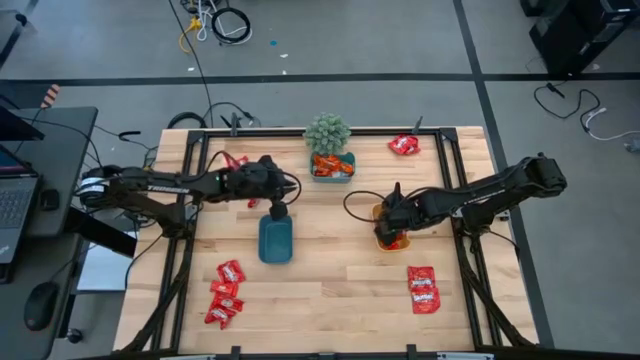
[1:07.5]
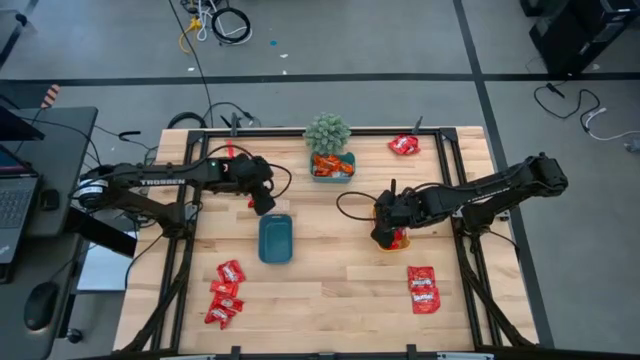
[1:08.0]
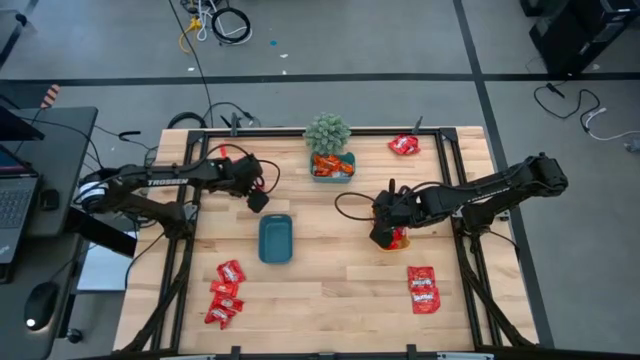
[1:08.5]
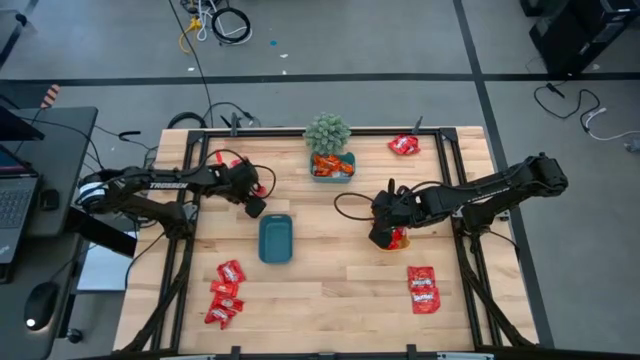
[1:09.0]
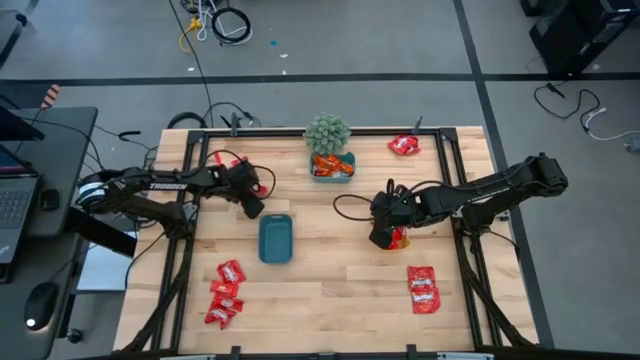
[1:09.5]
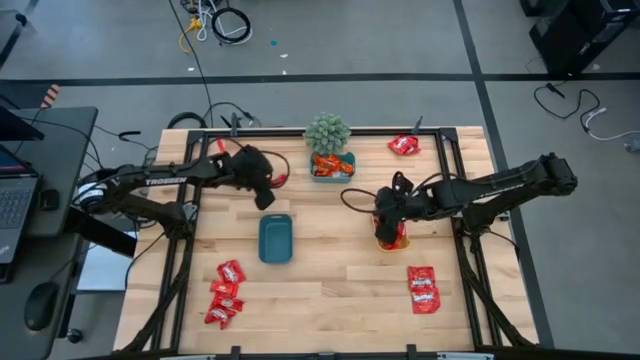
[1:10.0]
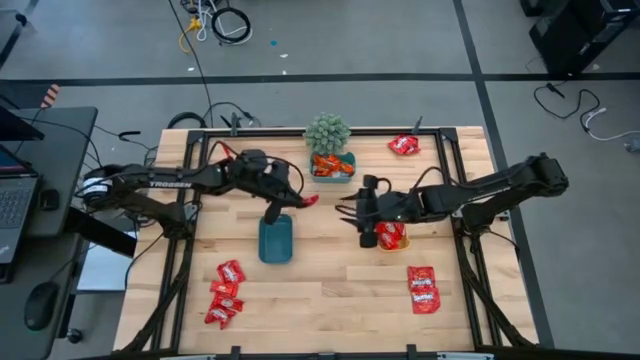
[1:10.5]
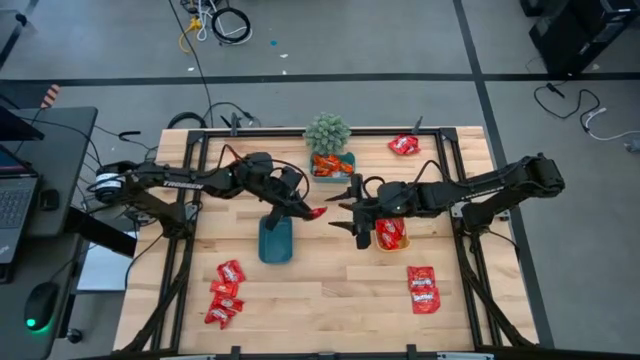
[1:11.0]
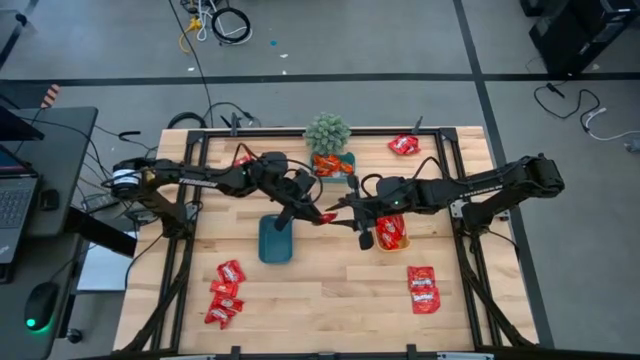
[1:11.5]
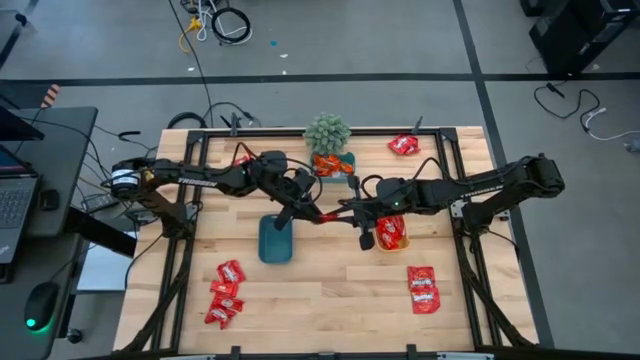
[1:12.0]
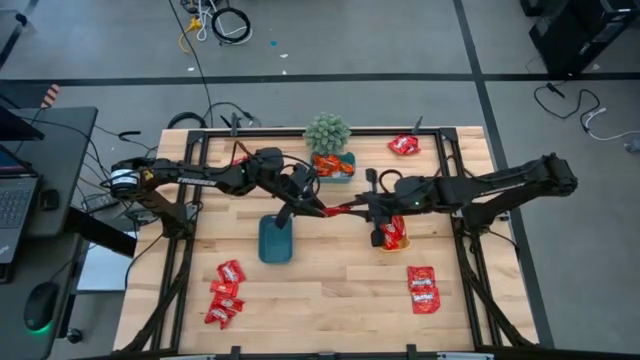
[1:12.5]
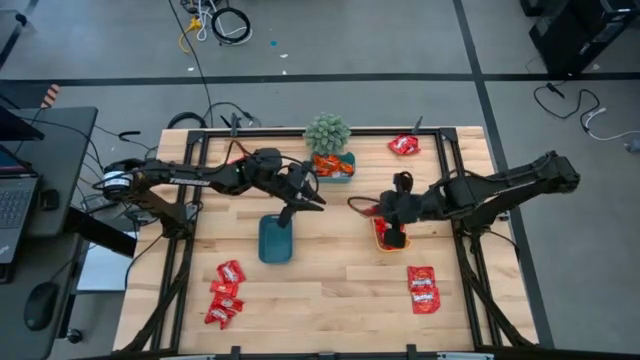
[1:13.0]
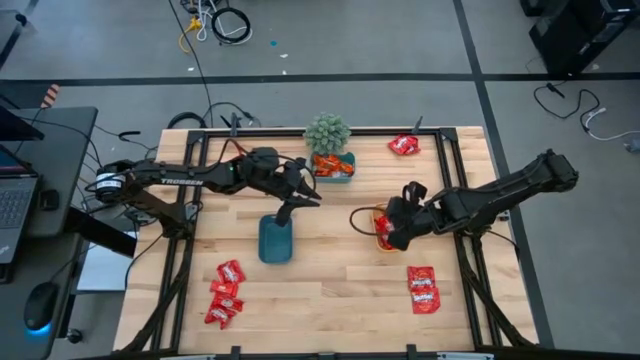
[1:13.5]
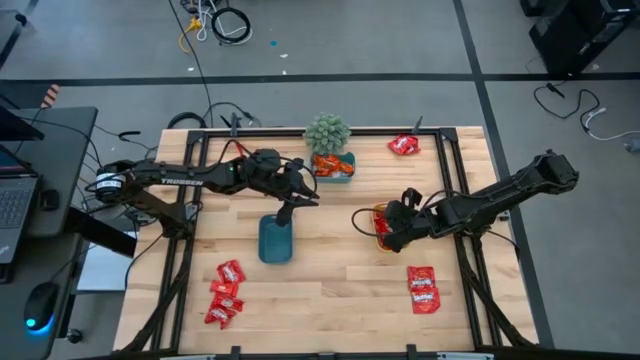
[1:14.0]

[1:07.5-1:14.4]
Task: Sort candy
Put the red chocolate into the yellow bin

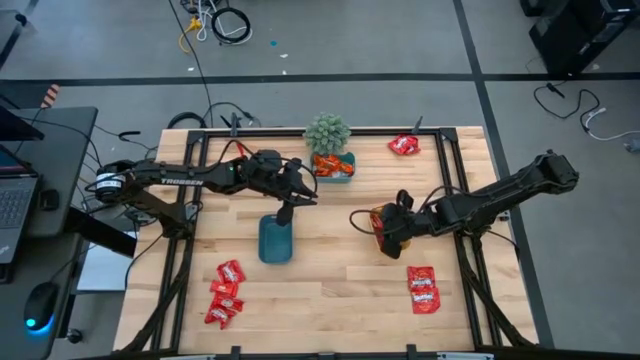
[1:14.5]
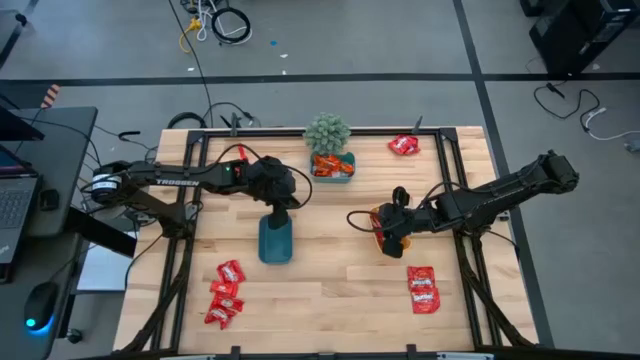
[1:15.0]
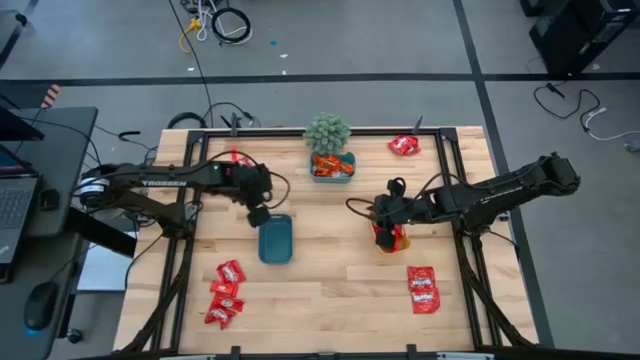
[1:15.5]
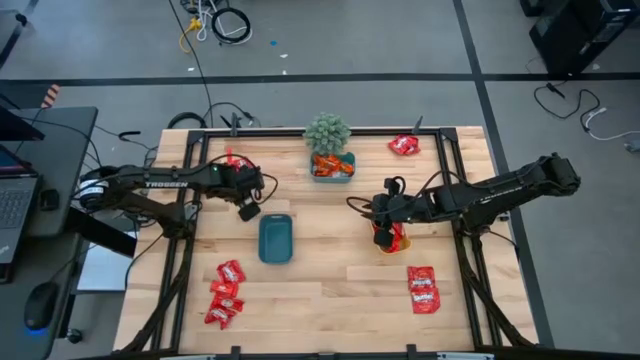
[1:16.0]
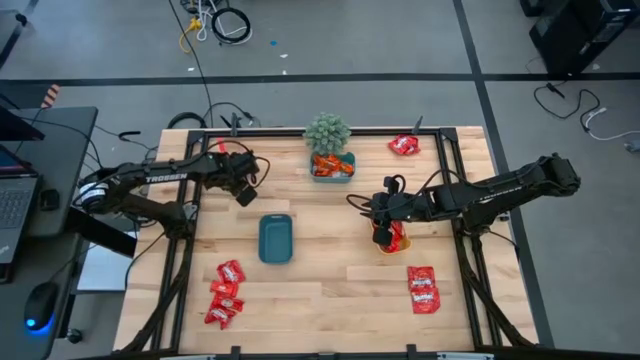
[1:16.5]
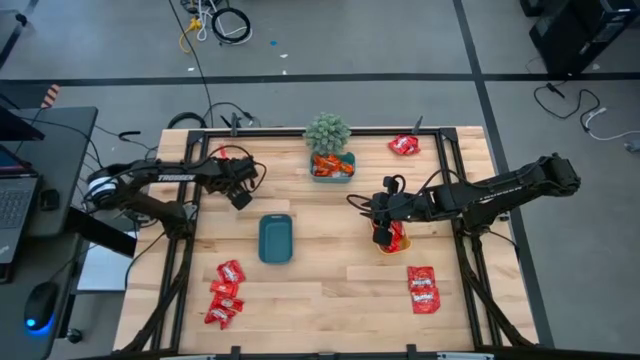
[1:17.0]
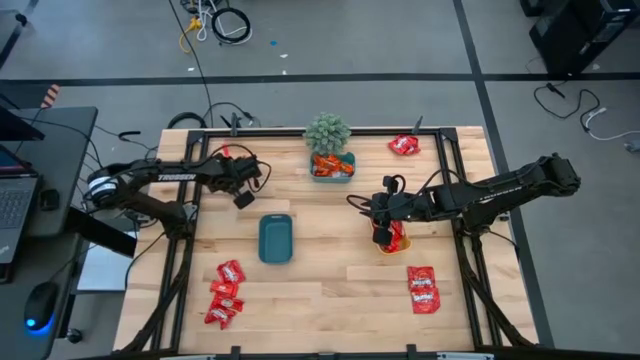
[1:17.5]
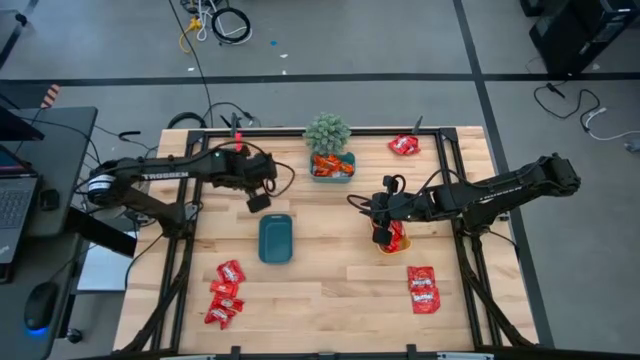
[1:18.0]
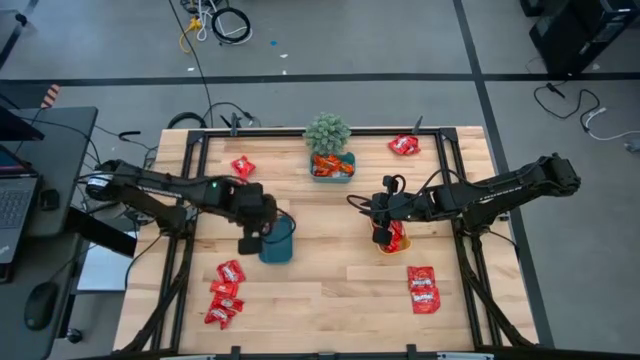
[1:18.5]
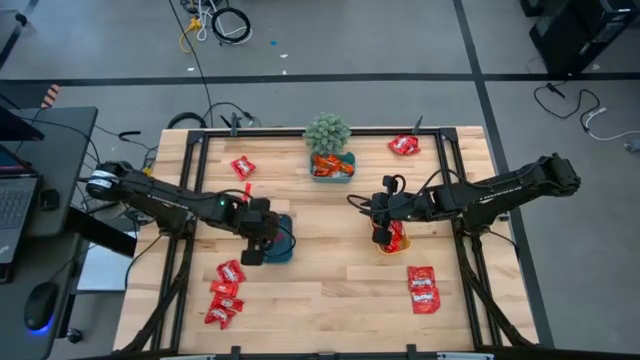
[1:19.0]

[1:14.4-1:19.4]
Put the red candy into the blue bin

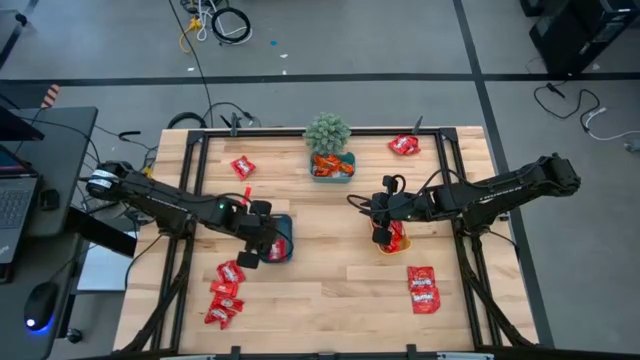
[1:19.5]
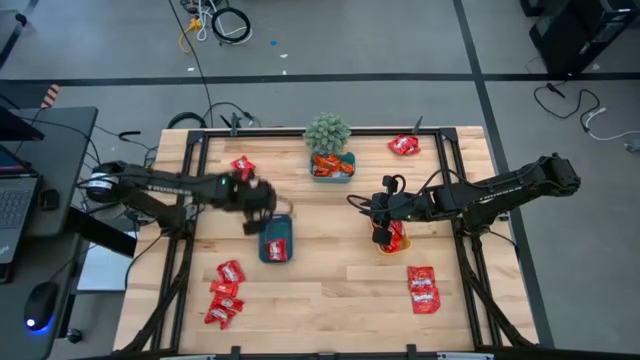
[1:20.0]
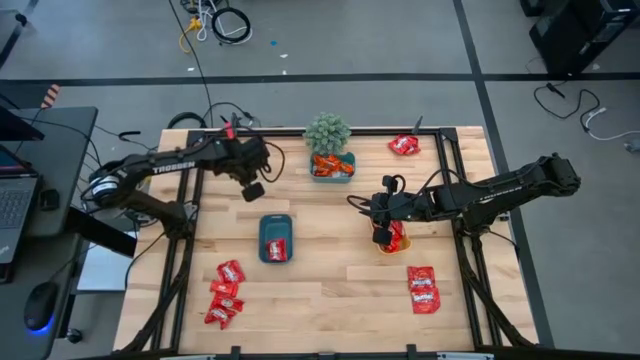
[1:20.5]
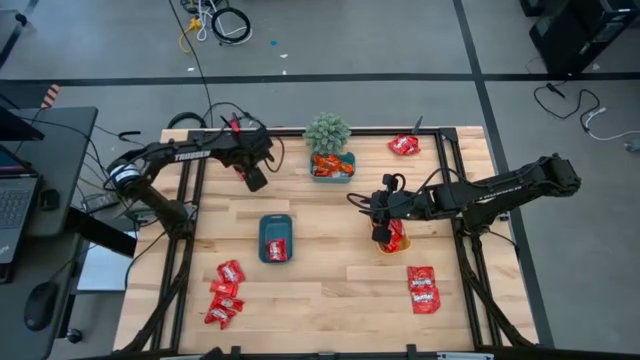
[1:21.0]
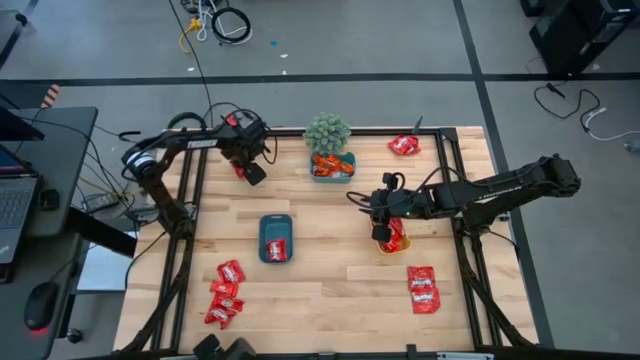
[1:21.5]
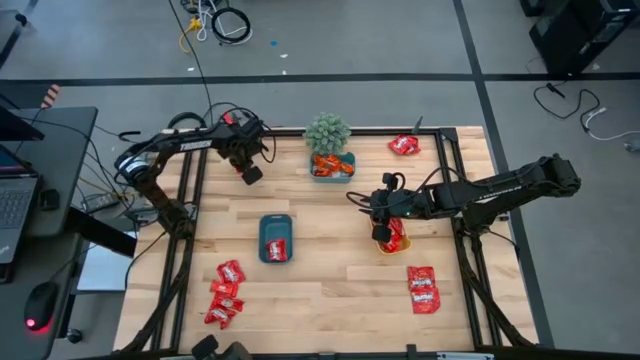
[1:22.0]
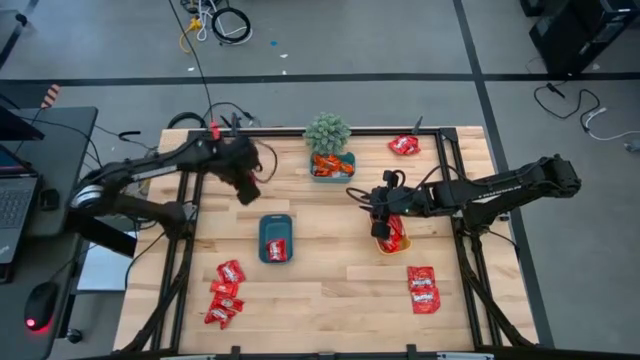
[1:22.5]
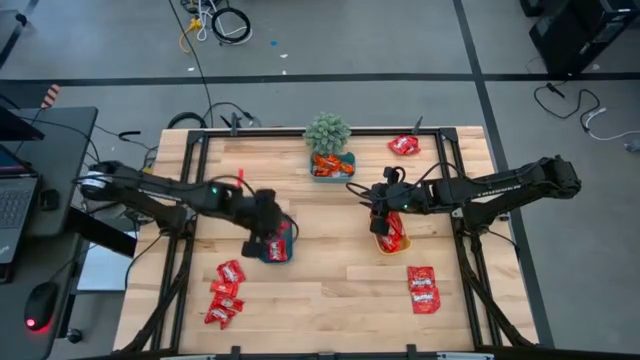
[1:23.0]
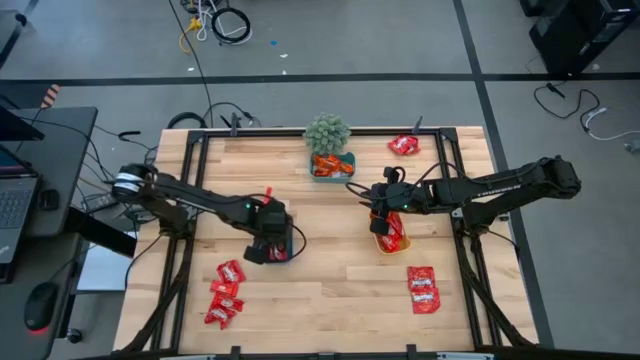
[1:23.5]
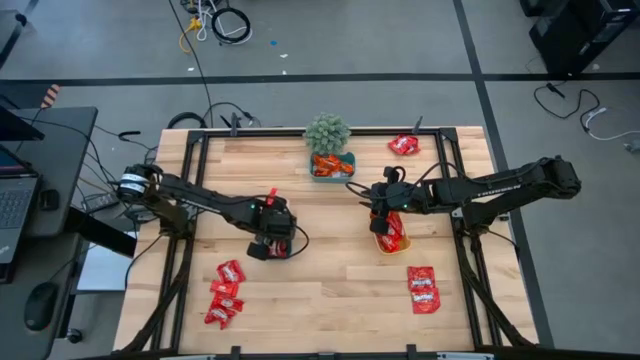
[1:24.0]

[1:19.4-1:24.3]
Put the red candy into the blue bin

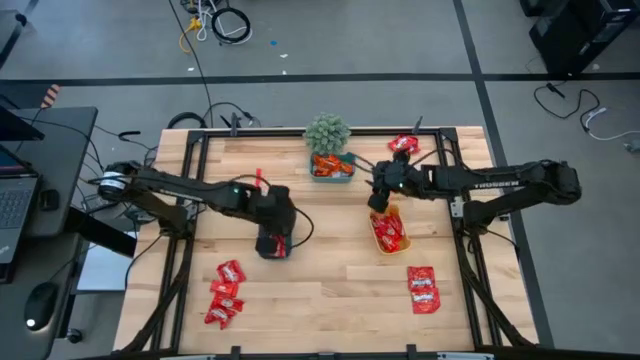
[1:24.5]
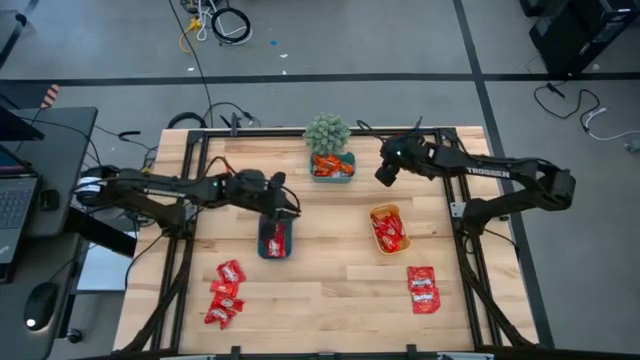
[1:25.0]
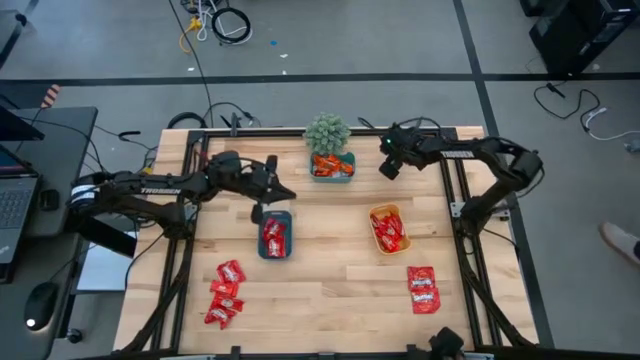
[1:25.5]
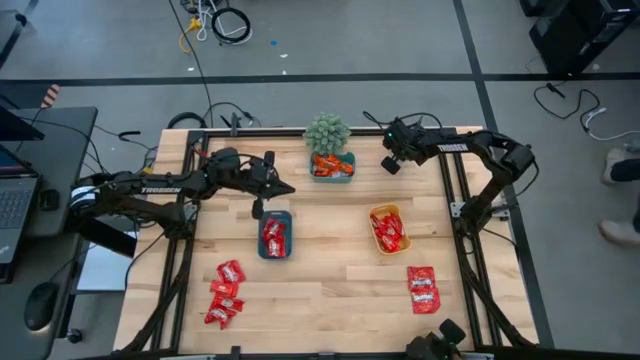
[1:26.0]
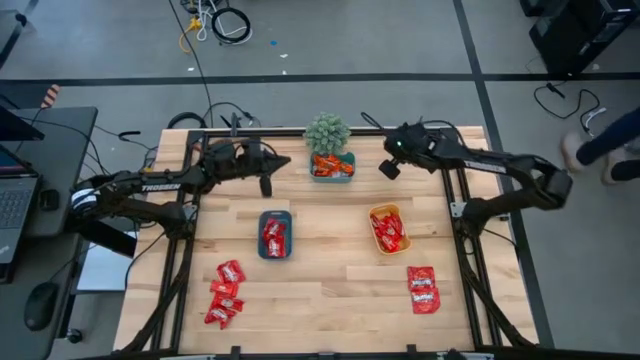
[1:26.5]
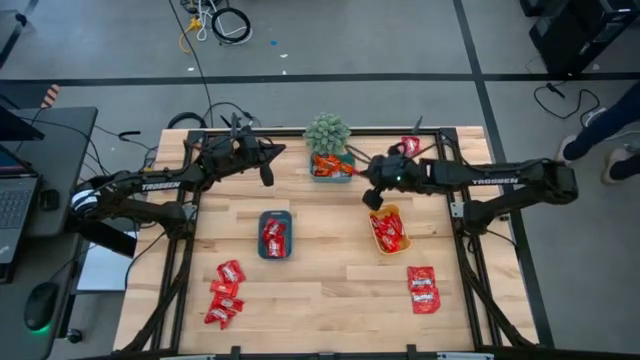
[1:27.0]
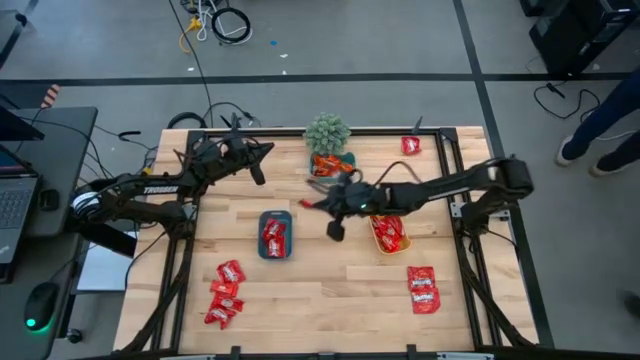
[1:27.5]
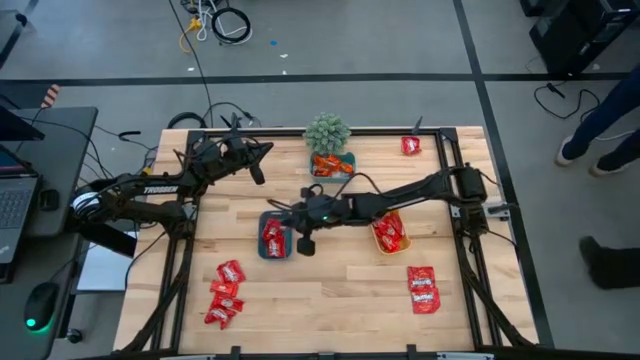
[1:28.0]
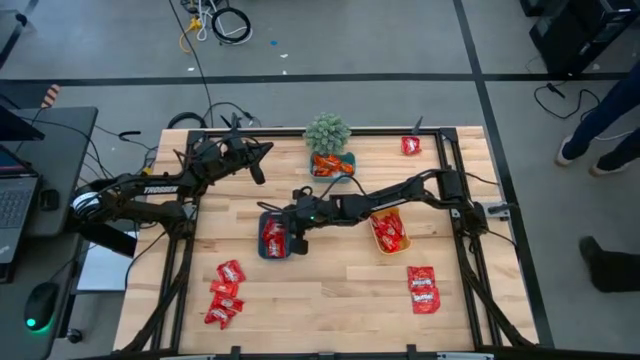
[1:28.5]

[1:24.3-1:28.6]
Put the red candy into the blue bin
